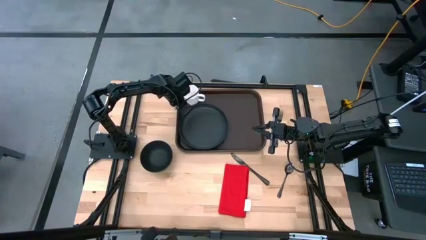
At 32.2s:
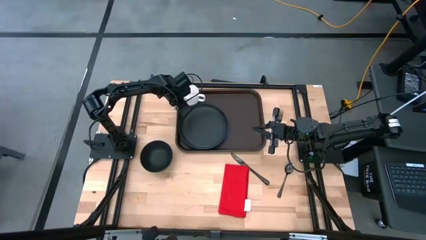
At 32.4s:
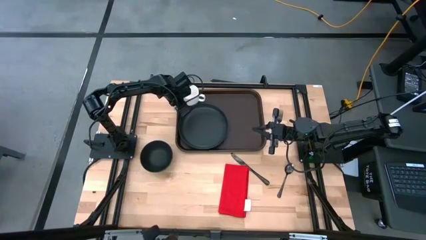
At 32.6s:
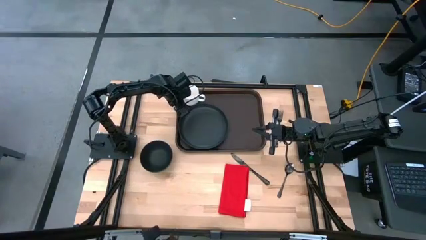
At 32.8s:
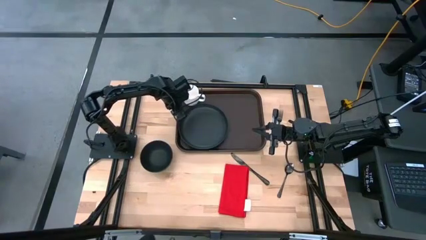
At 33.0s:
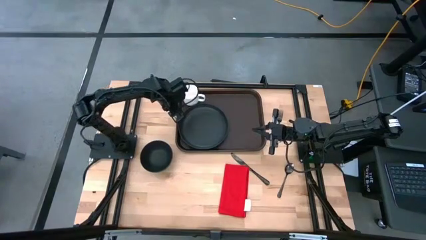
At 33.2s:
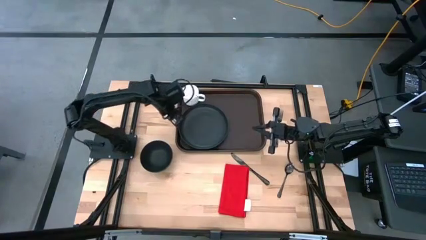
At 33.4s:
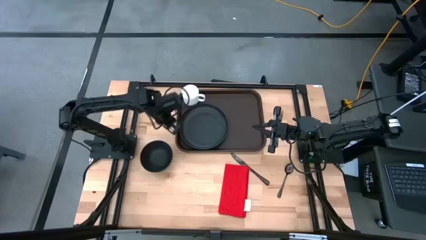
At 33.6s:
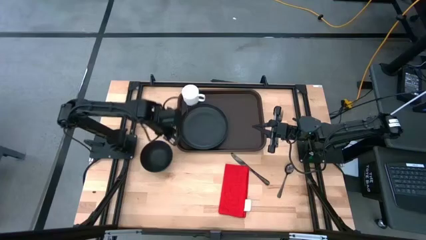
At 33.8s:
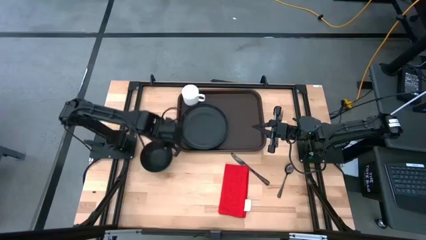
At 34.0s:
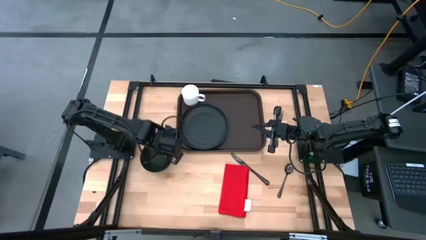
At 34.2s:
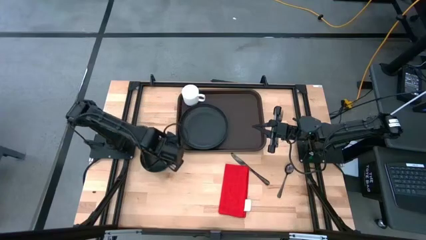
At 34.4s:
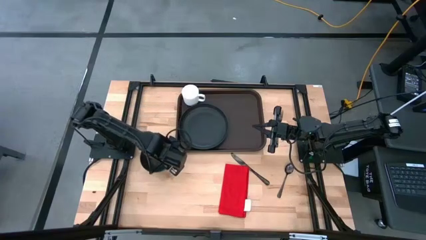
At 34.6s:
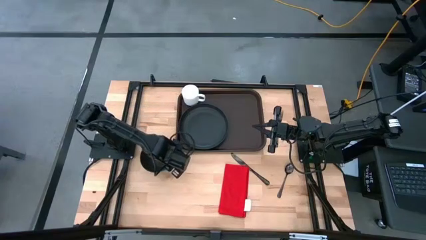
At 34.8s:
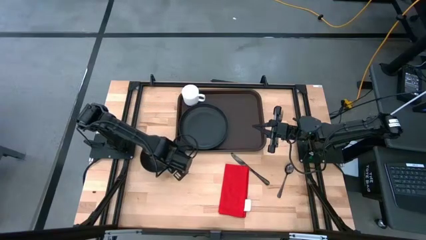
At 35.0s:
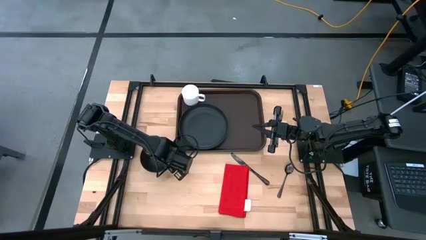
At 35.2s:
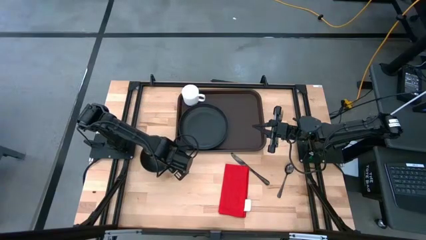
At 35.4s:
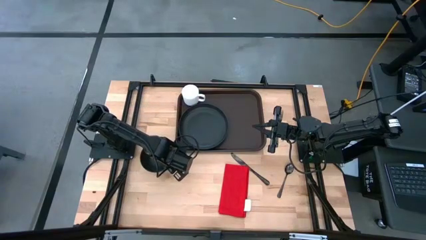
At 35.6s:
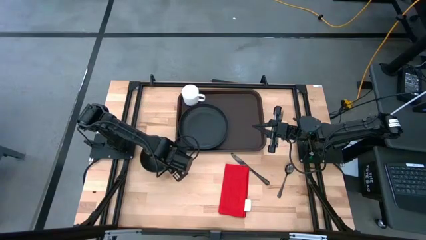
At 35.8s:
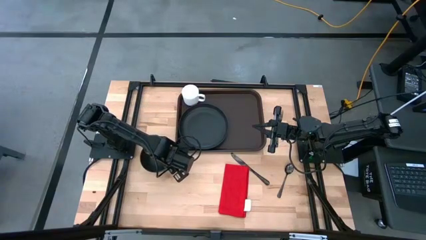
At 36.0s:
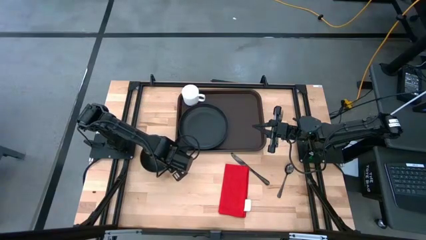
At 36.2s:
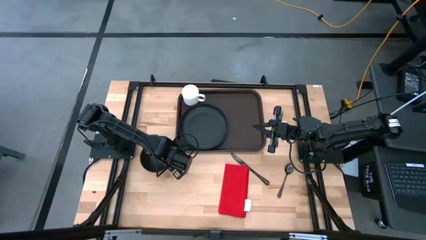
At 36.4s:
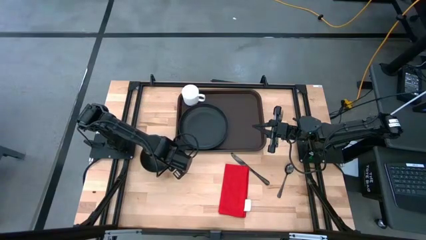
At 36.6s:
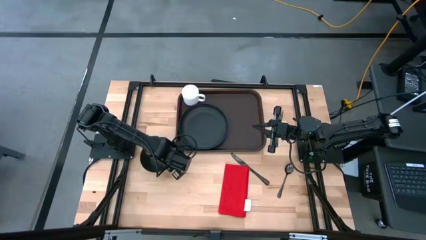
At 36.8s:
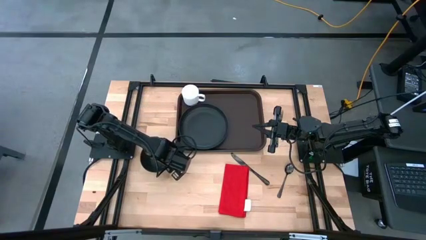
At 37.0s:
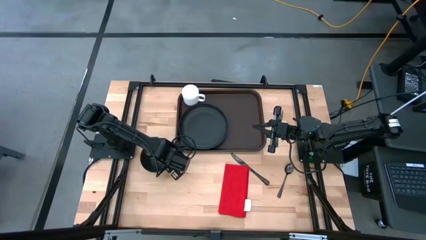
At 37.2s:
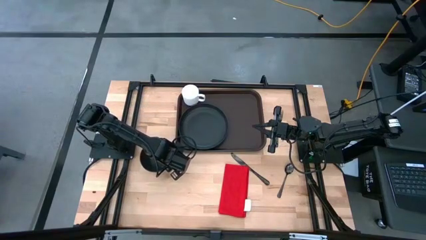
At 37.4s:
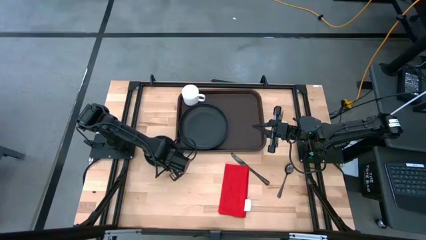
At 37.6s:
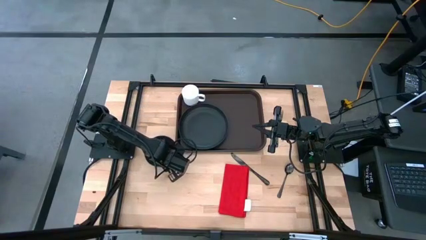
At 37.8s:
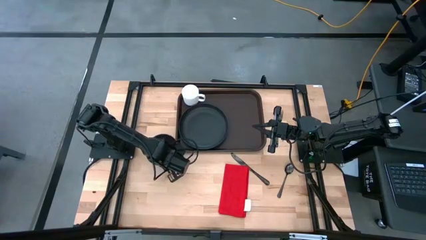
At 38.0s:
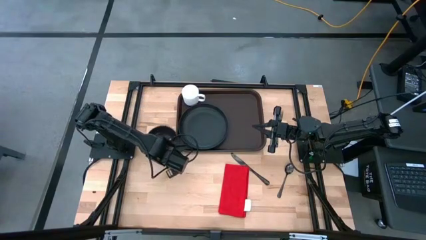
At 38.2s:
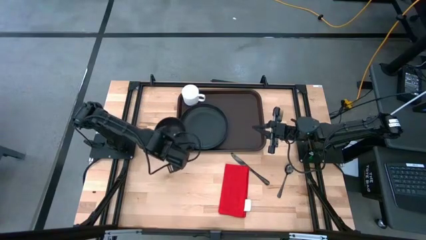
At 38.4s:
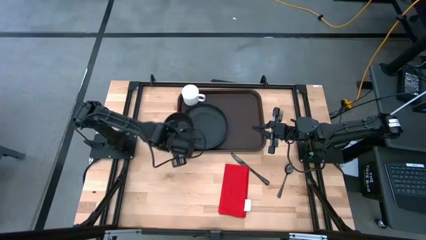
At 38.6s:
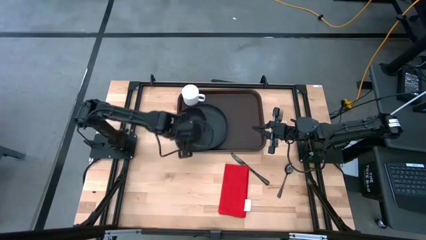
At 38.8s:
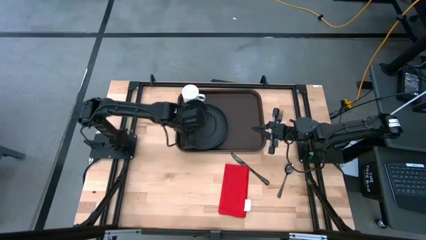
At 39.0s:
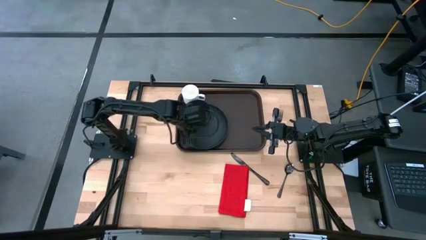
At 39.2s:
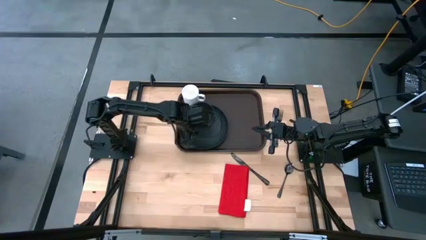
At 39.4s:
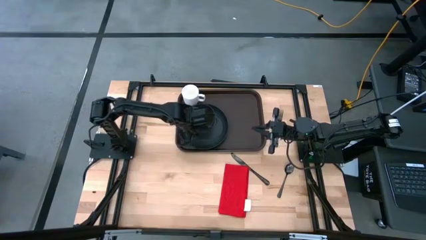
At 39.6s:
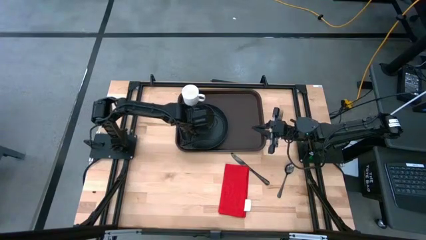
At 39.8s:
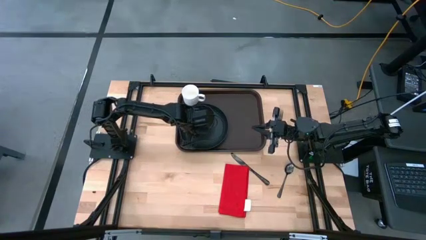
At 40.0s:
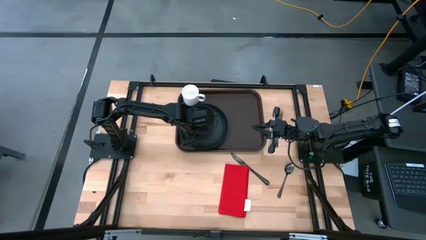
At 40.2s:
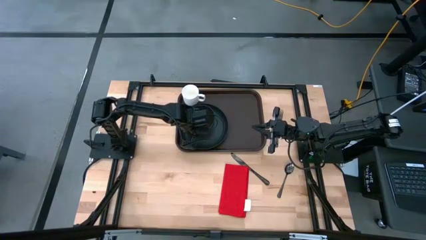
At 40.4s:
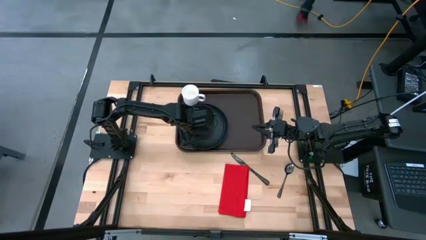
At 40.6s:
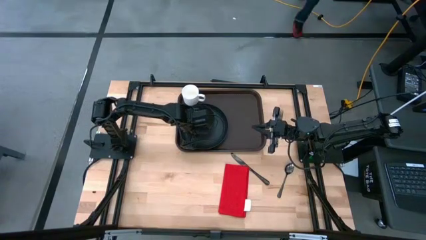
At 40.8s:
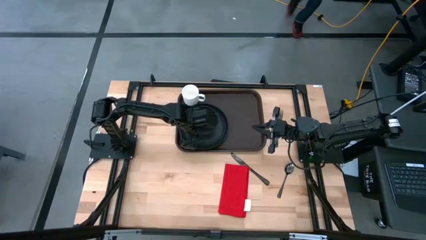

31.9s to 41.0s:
Task: Set up tray
Put the black bowl on the black plate

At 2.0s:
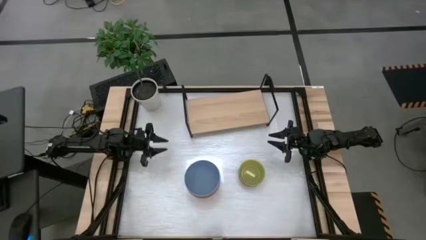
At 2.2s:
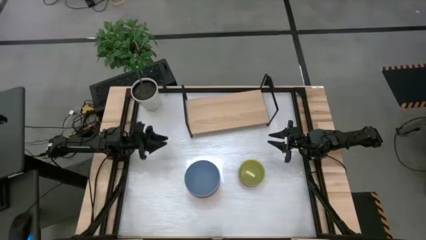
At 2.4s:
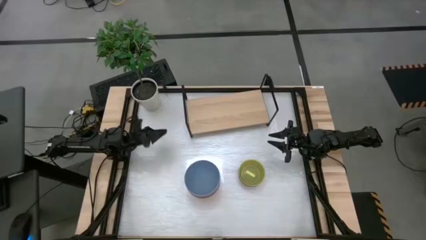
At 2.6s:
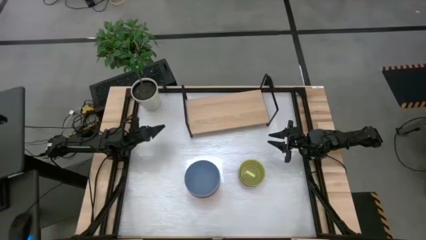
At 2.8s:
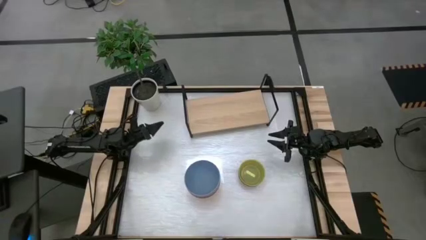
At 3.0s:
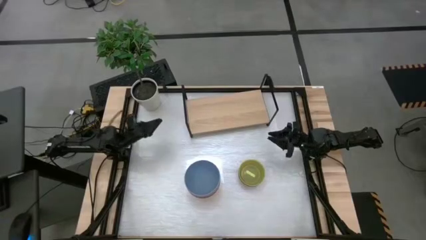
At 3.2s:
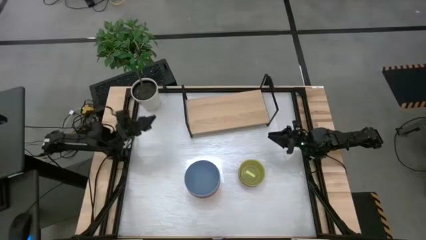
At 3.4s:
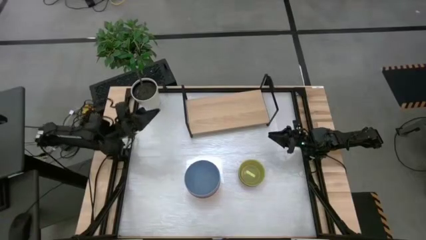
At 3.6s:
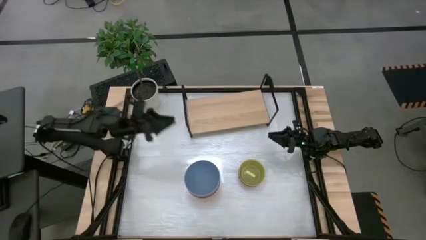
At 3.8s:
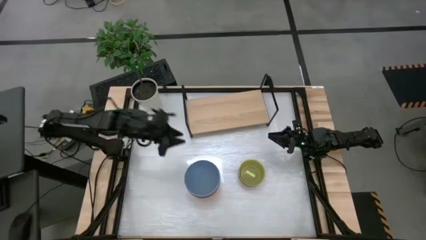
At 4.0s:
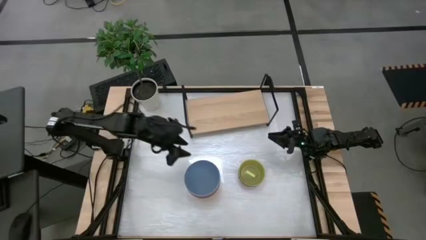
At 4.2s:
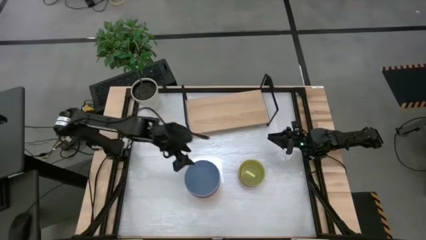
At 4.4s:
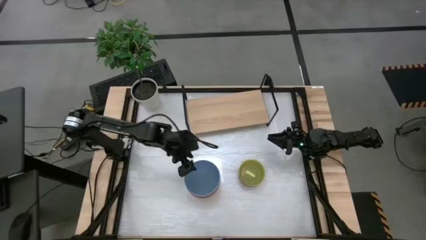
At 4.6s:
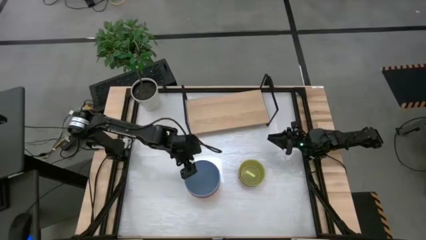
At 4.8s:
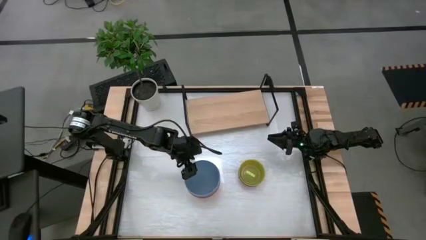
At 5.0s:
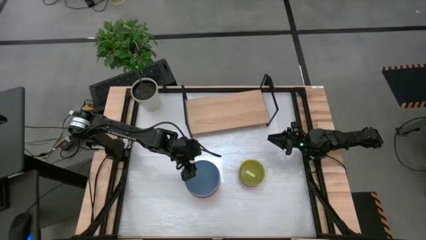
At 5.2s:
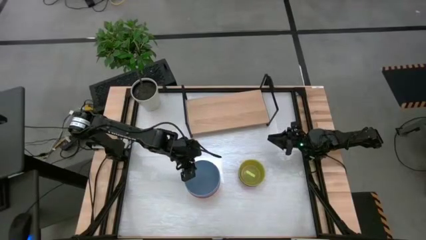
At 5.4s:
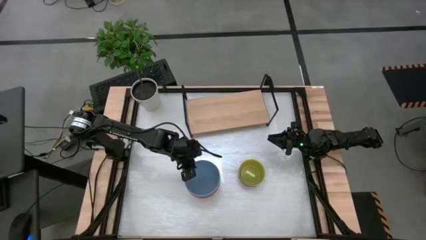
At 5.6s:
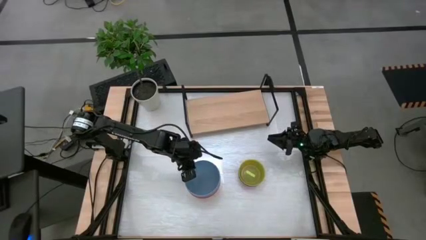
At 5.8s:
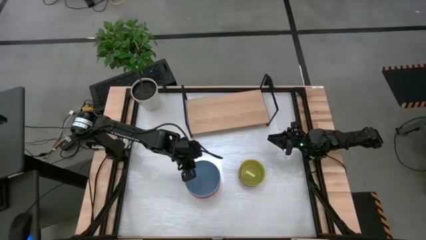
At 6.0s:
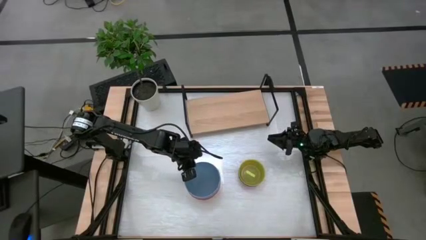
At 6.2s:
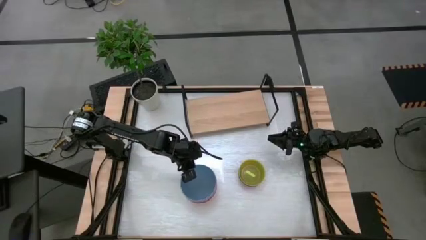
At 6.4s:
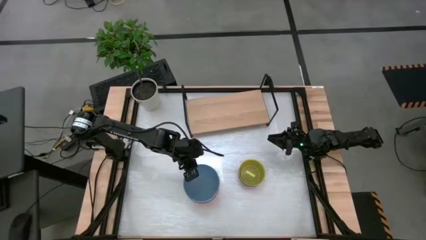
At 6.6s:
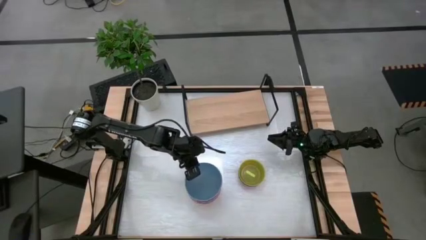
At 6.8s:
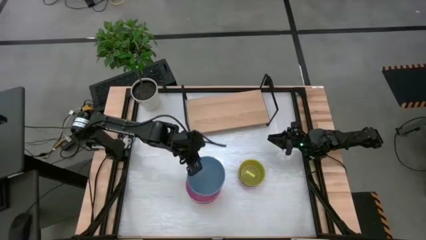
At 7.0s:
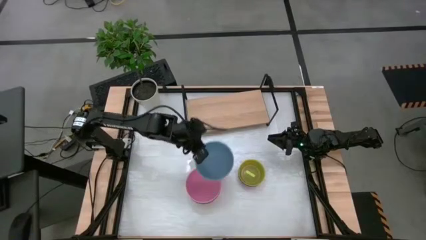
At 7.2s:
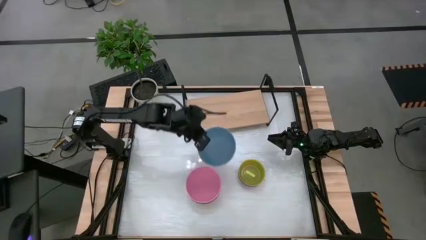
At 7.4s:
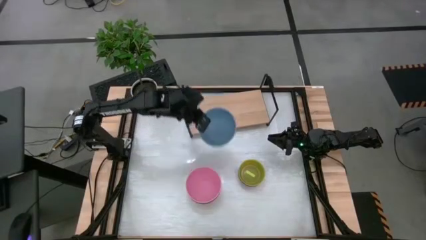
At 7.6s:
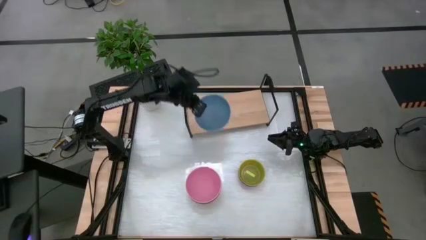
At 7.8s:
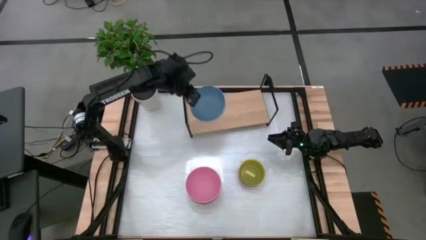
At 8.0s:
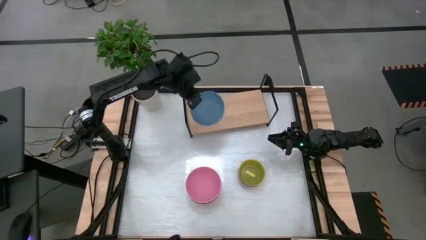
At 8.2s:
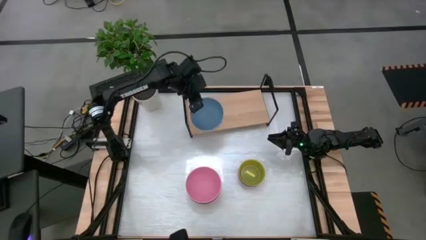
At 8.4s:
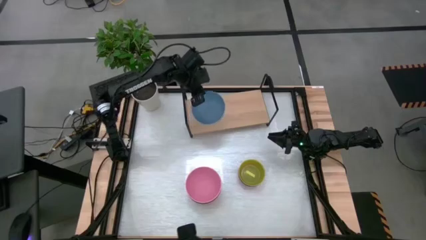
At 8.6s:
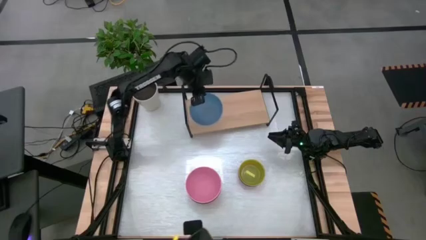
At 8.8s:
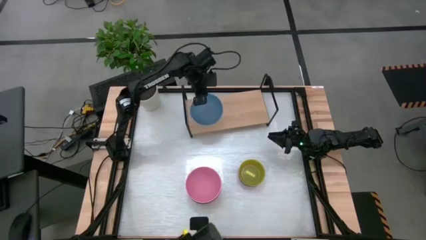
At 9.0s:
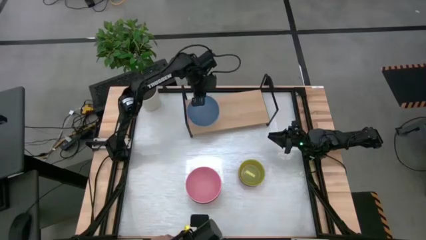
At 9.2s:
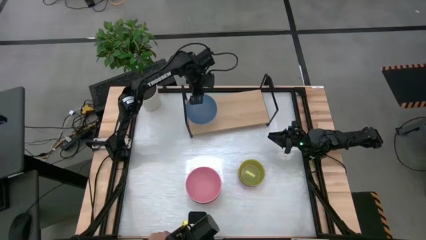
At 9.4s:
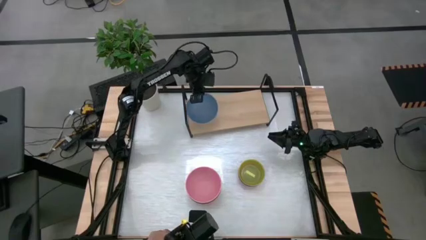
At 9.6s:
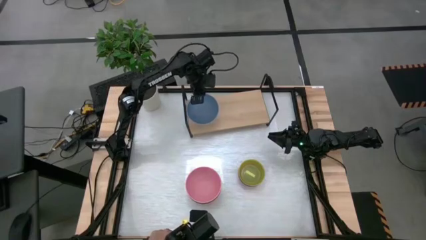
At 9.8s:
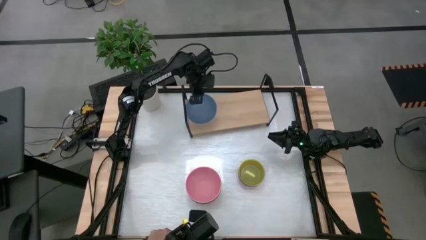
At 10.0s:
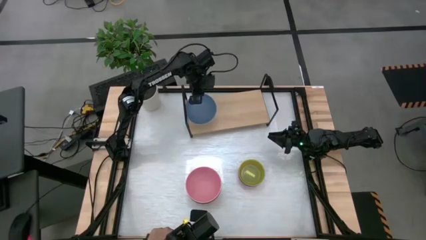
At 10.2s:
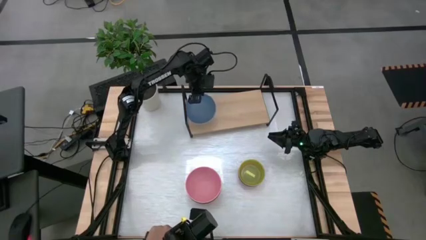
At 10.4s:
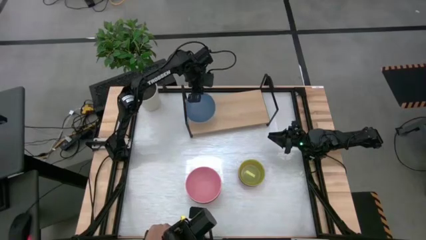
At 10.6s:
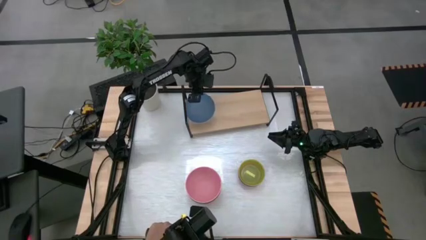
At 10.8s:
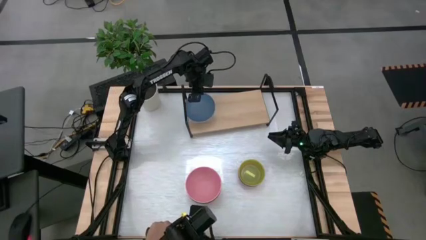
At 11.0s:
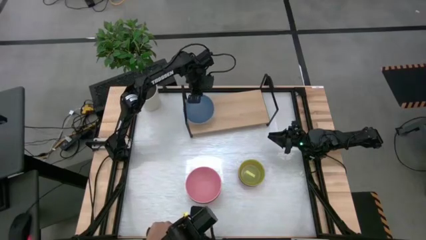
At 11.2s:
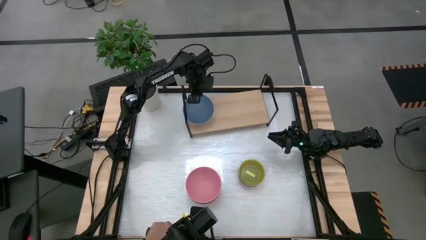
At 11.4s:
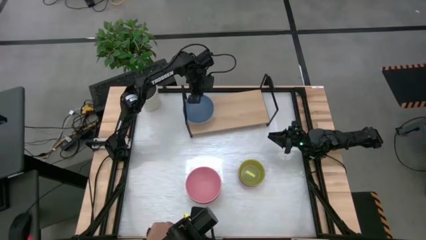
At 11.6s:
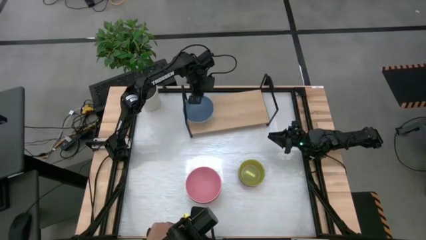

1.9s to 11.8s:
Task: Place and stack bowls onto a shelf
Put the big blue bowl on the shelf
